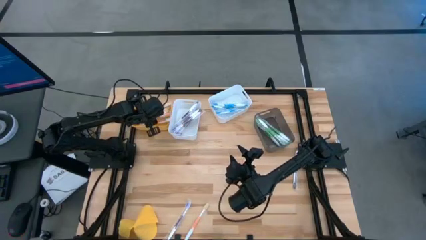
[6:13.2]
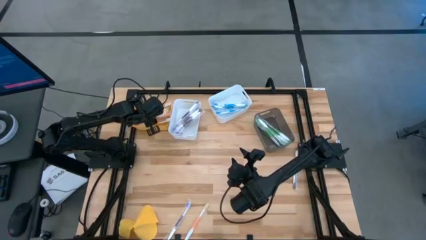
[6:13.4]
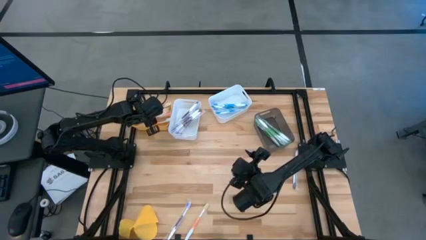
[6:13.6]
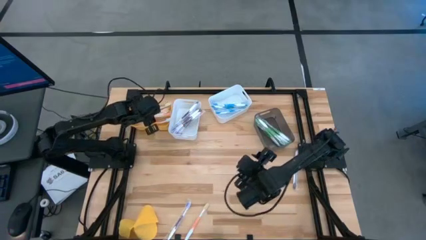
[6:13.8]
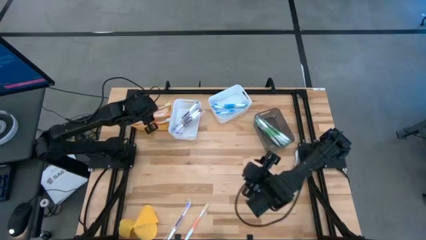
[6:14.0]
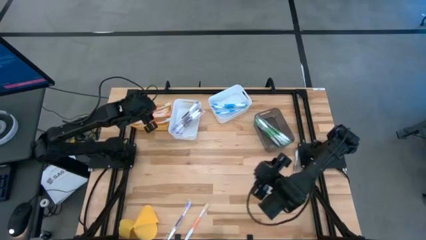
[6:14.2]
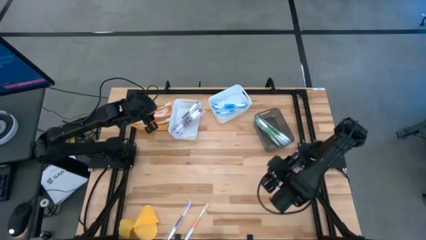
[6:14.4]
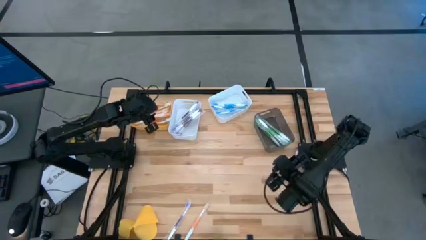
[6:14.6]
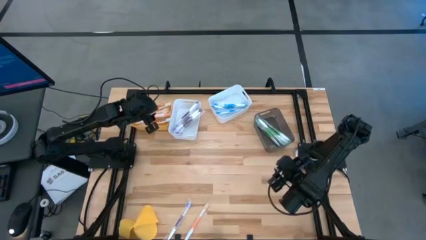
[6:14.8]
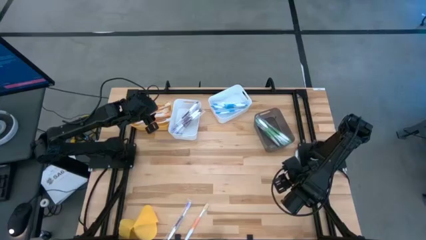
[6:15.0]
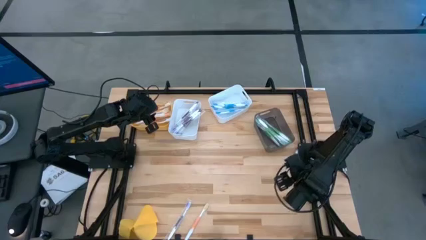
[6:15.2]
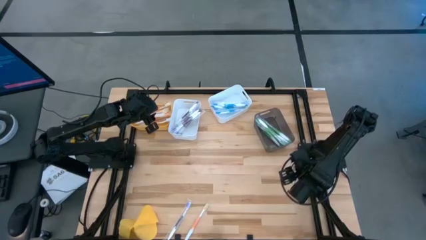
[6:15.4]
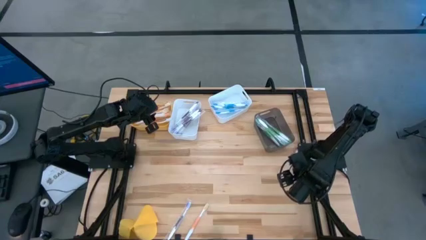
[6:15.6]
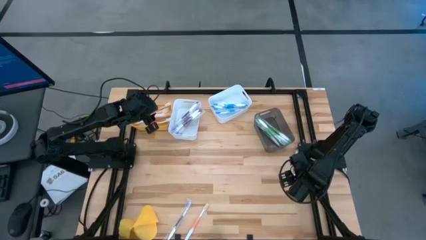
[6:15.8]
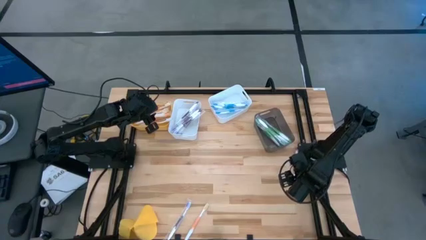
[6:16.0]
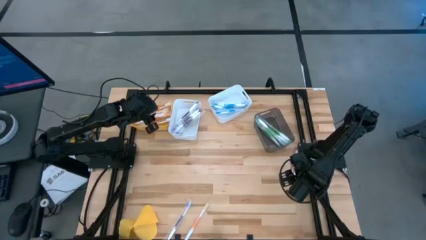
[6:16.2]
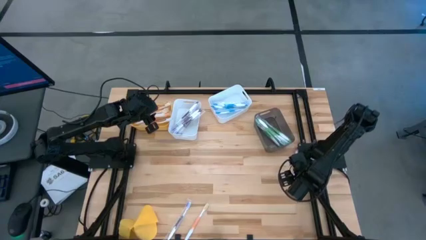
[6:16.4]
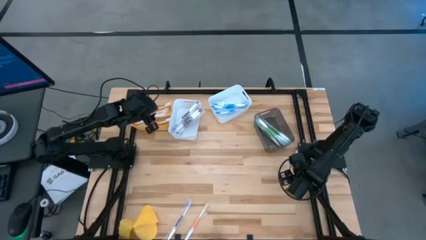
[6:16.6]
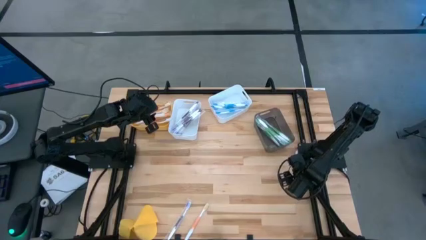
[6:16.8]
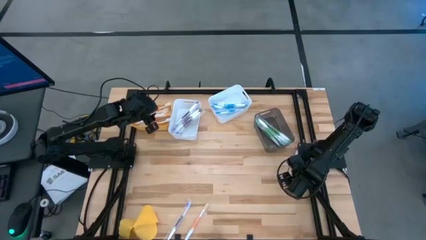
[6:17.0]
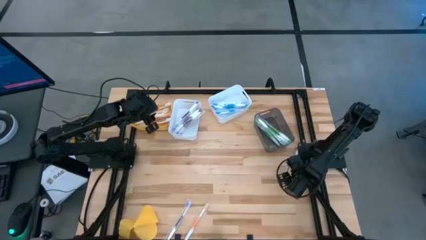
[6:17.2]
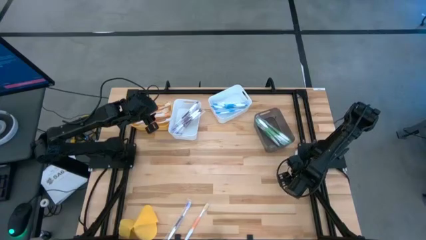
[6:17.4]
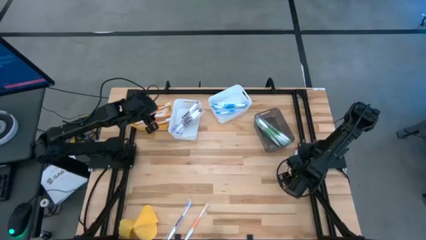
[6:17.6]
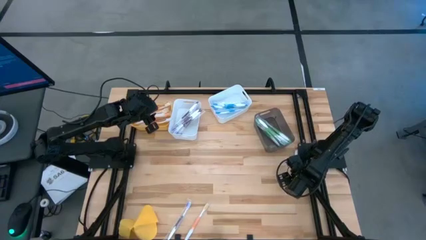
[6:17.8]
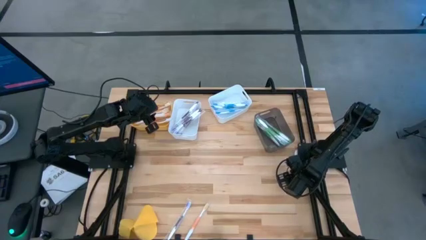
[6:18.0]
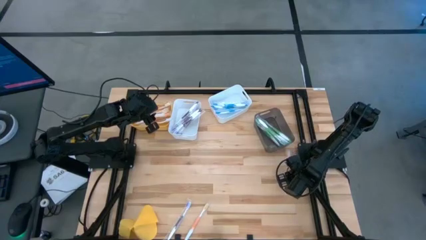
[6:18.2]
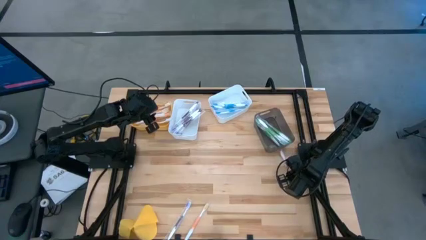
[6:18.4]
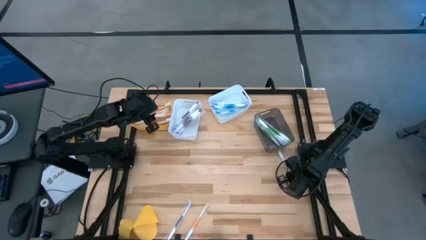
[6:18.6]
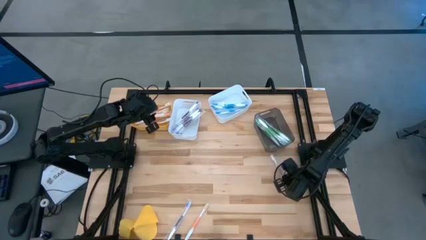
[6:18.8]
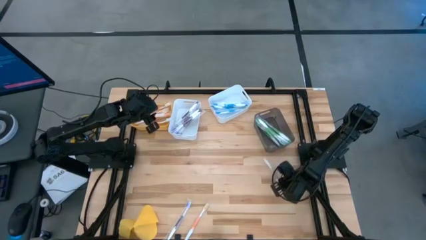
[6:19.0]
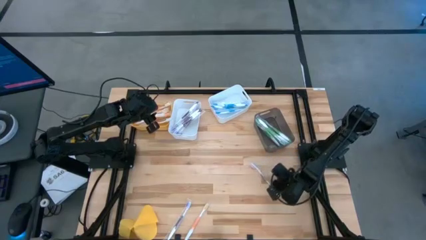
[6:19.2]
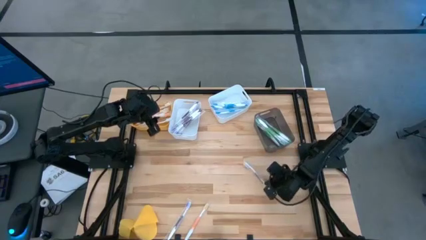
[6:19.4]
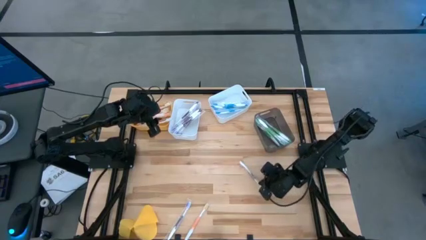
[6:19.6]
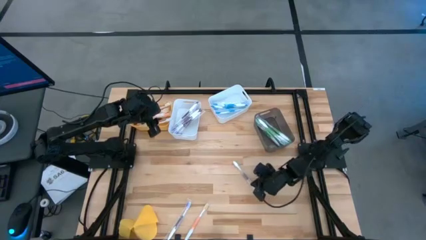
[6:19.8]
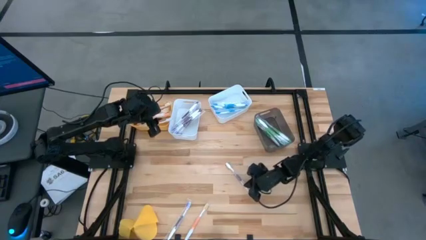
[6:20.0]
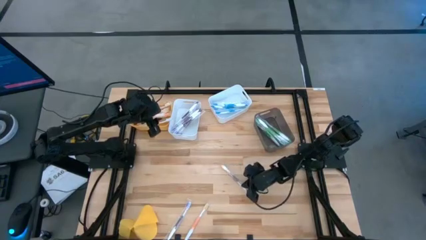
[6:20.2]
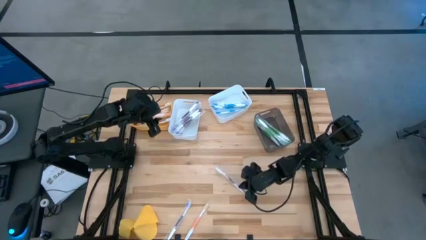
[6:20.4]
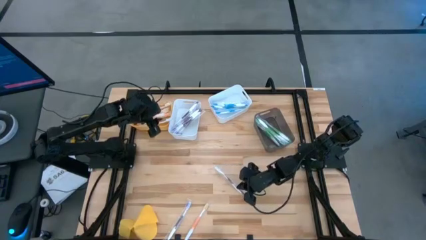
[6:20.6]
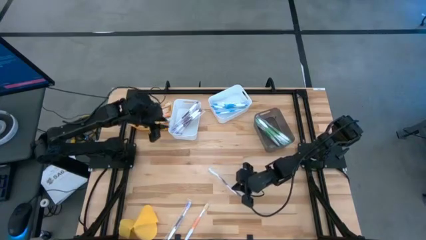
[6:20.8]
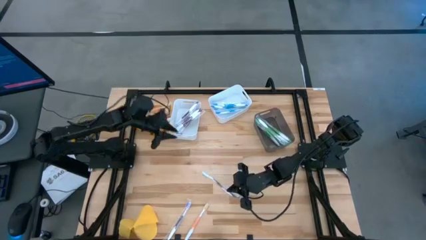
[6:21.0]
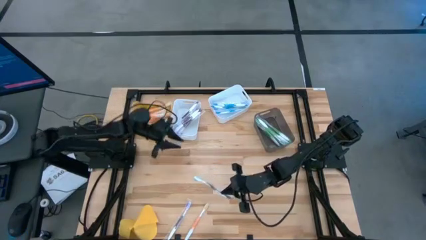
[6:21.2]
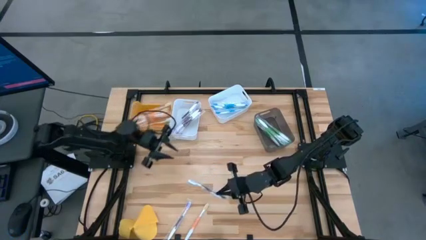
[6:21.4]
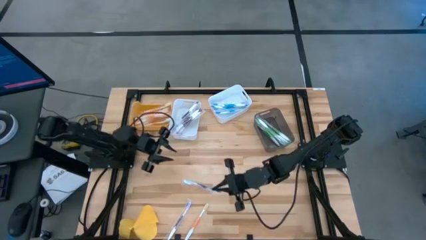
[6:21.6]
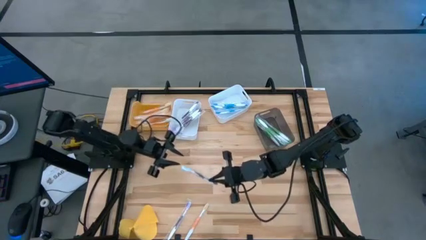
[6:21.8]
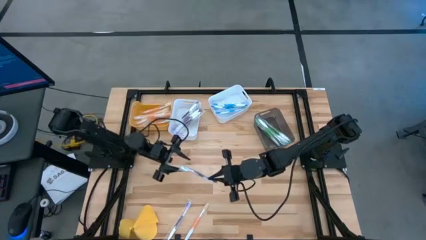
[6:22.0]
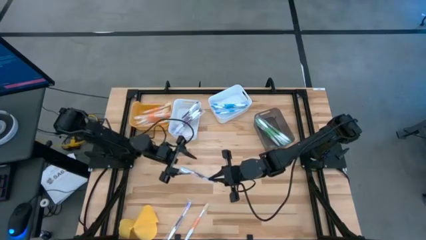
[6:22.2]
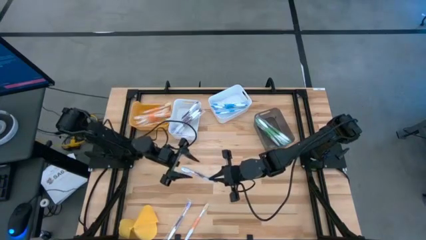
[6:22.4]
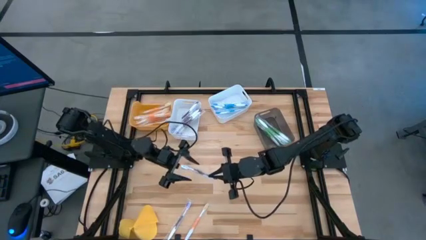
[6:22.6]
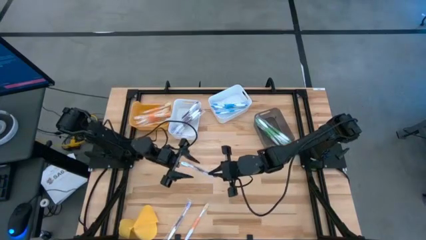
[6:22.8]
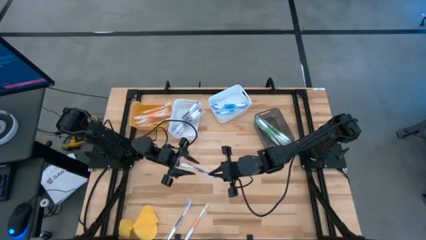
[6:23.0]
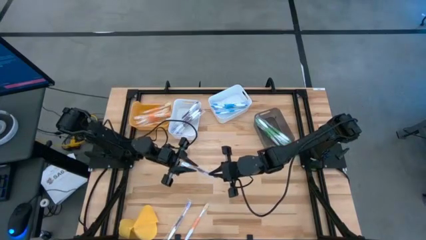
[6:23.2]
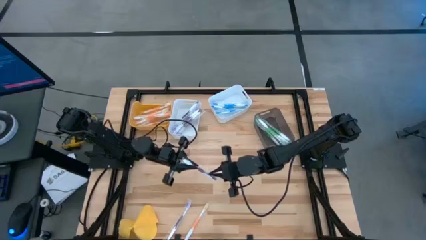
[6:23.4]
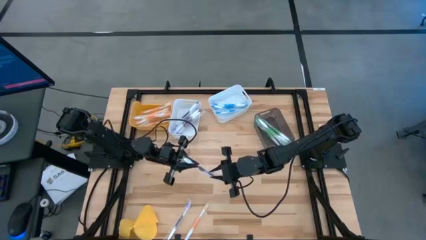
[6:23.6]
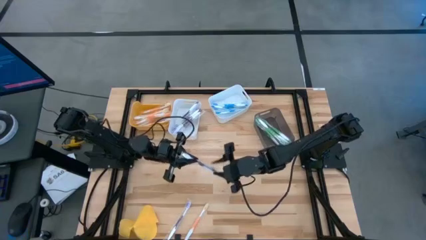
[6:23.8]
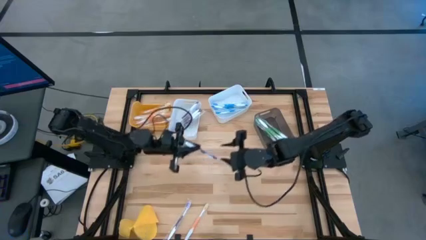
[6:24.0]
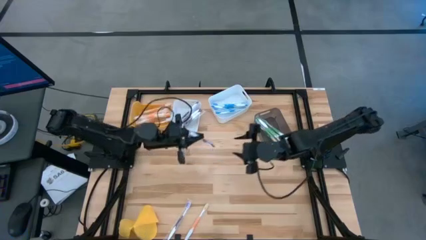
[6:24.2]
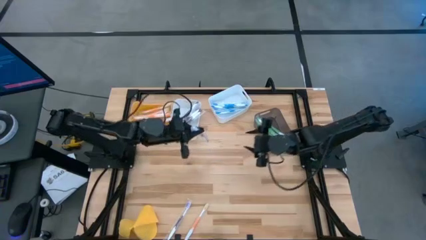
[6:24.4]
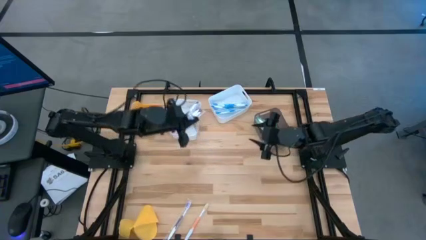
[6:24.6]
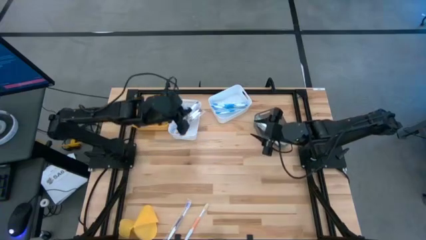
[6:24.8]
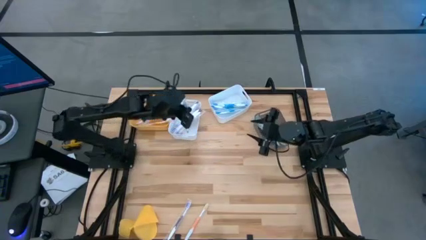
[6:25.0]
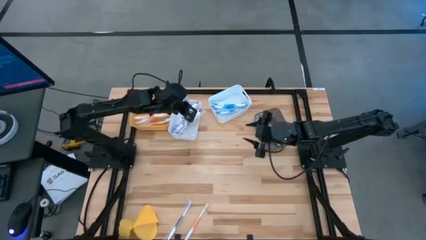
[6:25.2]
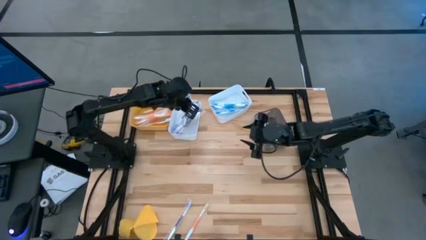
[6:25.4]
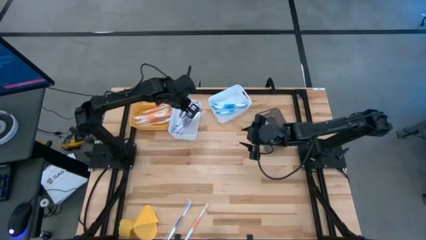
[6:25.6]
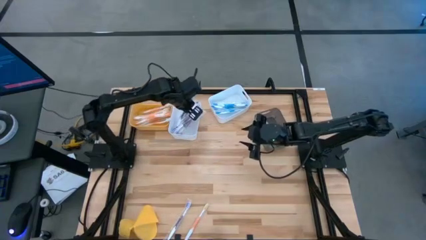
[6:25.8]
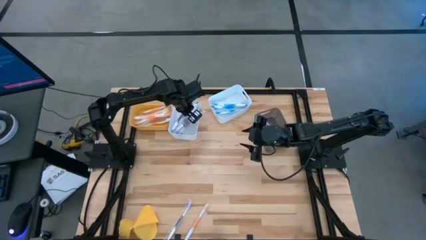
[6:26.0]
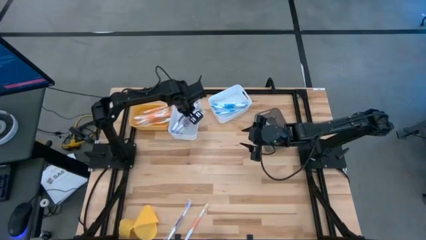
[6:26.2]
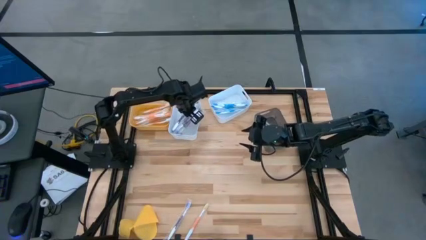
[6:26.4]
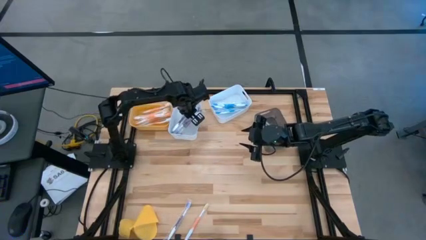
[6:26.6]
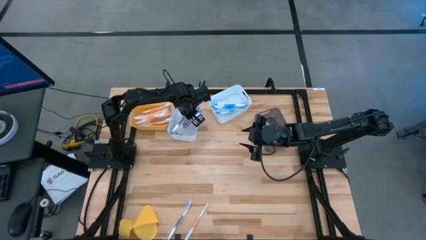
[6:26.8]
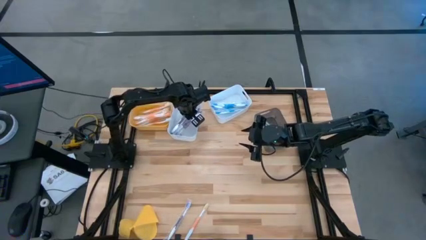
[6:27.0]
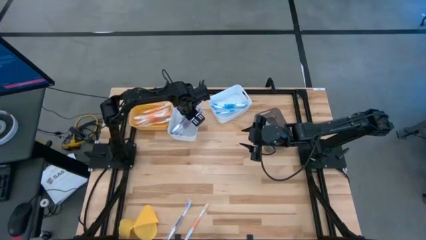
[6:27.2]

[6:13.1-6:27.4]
Task: Pick & Place Toothbrushes
Put the purple toothbrush into the left white bin
